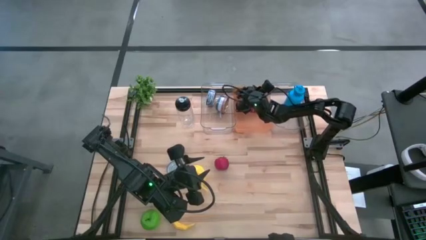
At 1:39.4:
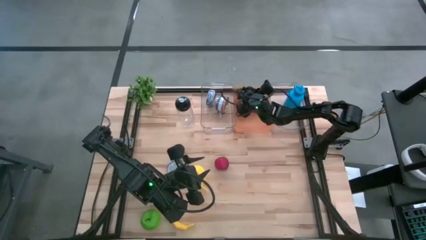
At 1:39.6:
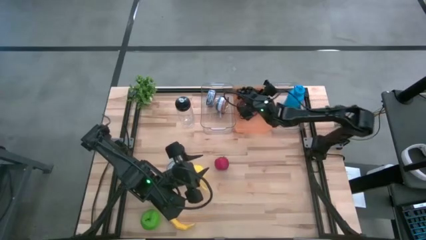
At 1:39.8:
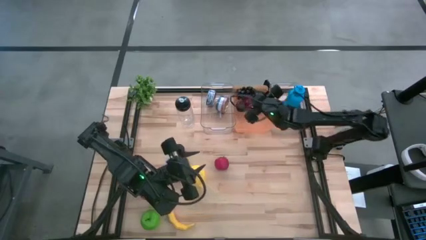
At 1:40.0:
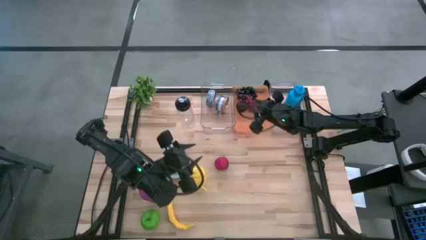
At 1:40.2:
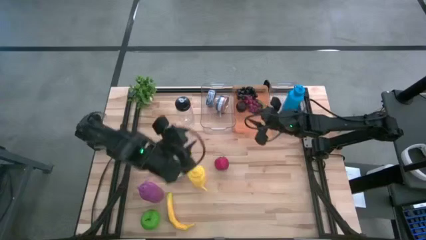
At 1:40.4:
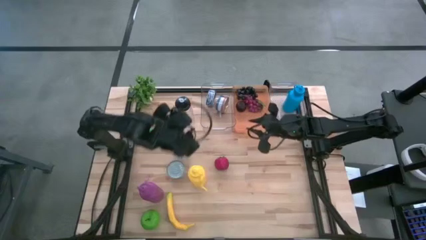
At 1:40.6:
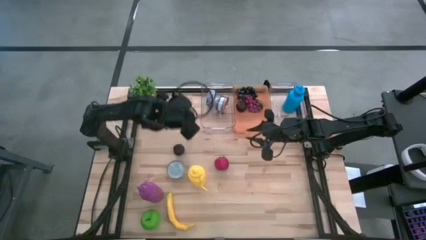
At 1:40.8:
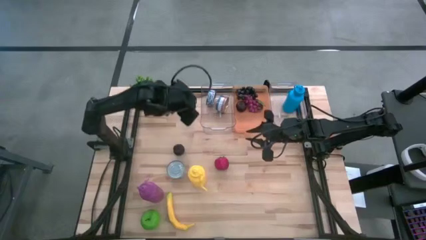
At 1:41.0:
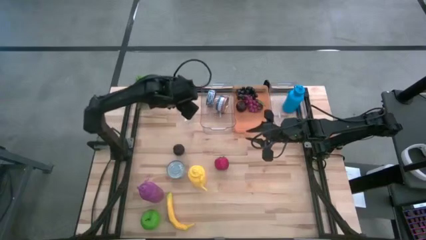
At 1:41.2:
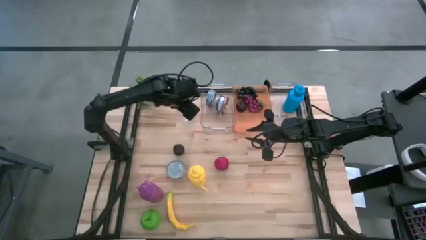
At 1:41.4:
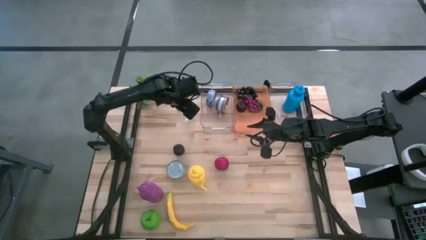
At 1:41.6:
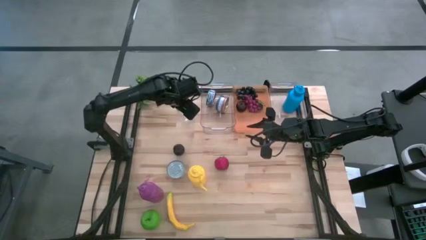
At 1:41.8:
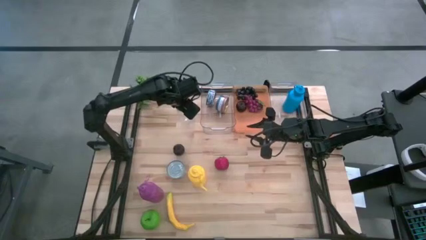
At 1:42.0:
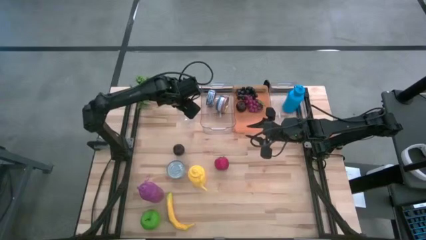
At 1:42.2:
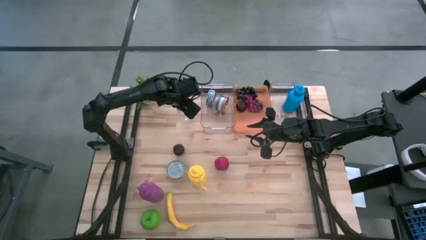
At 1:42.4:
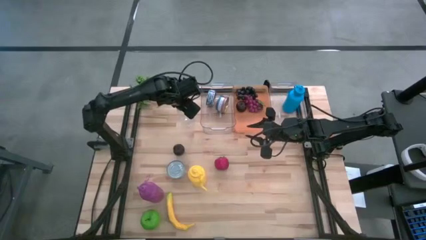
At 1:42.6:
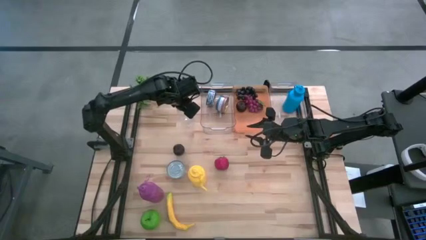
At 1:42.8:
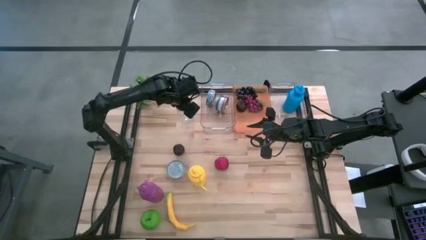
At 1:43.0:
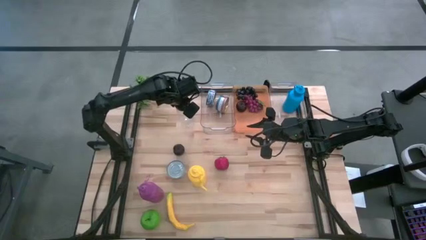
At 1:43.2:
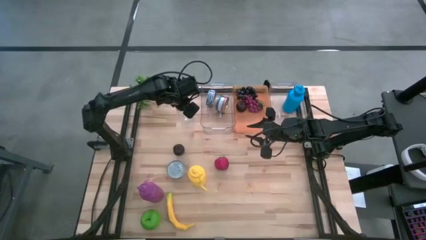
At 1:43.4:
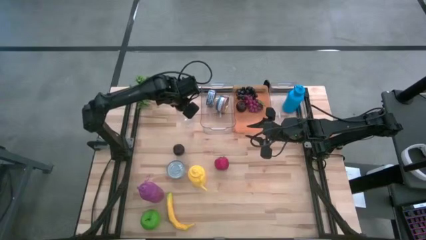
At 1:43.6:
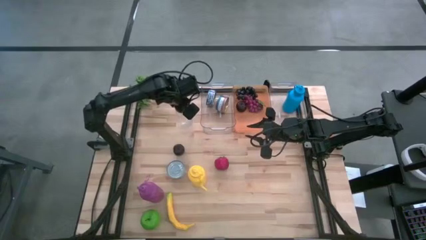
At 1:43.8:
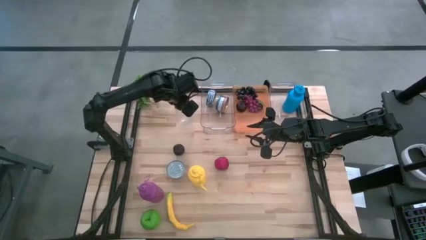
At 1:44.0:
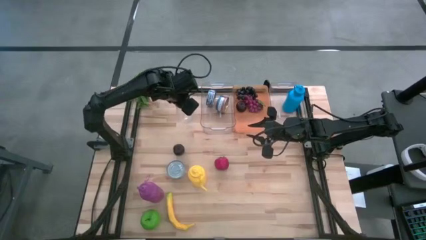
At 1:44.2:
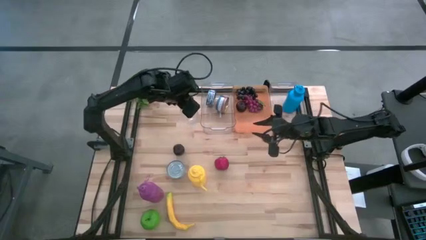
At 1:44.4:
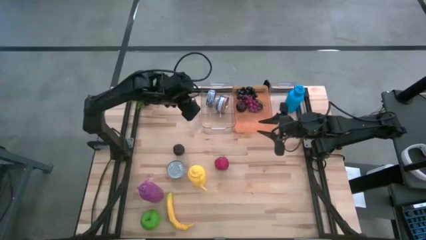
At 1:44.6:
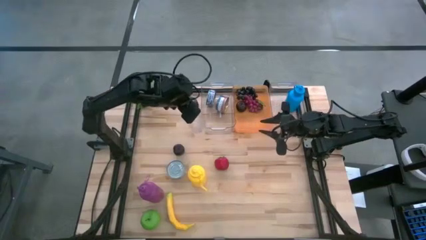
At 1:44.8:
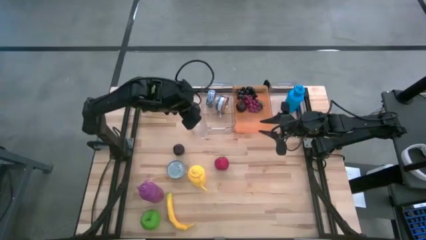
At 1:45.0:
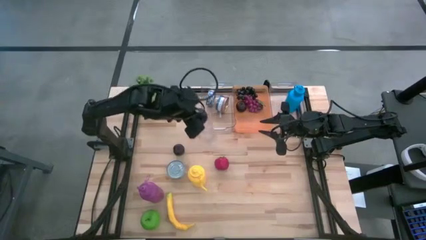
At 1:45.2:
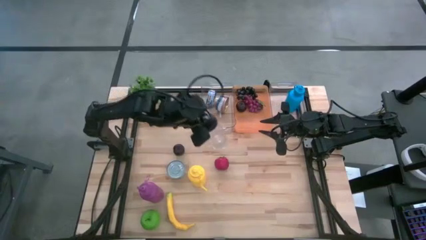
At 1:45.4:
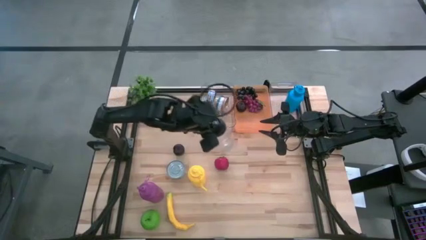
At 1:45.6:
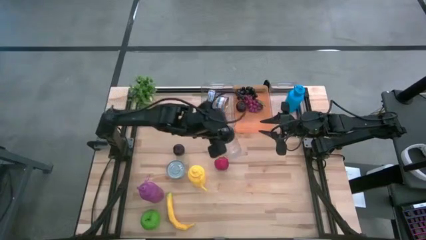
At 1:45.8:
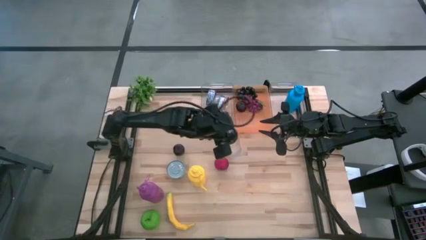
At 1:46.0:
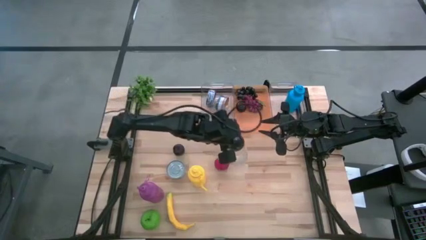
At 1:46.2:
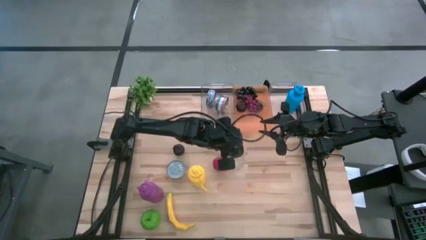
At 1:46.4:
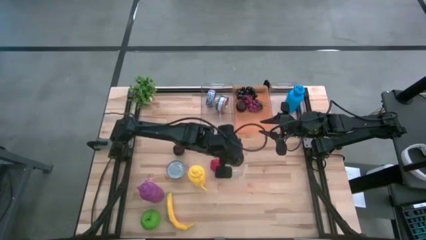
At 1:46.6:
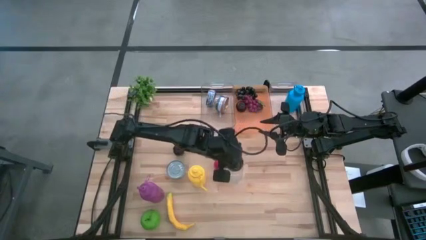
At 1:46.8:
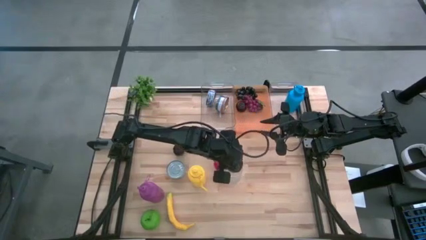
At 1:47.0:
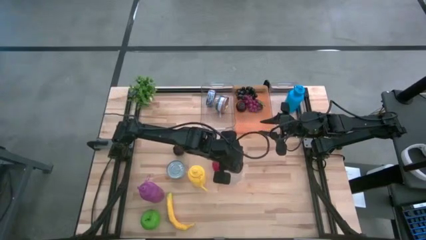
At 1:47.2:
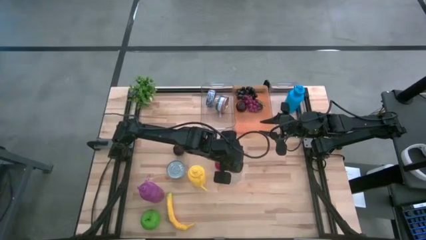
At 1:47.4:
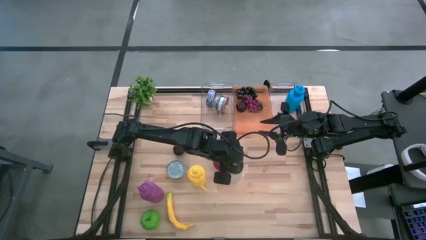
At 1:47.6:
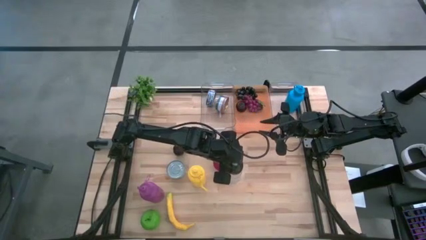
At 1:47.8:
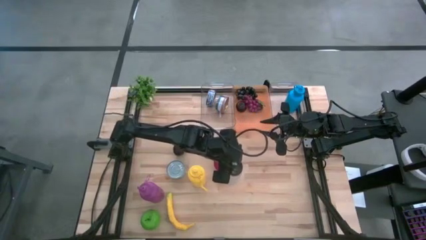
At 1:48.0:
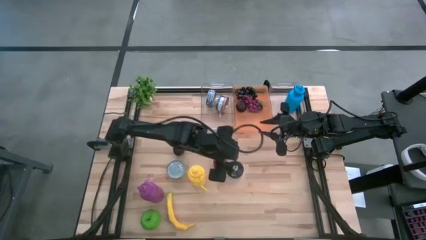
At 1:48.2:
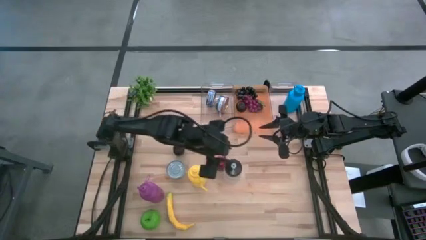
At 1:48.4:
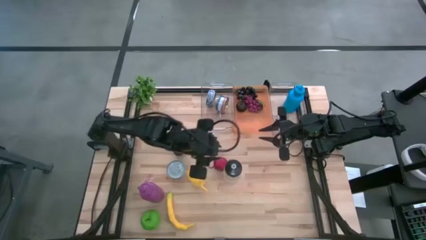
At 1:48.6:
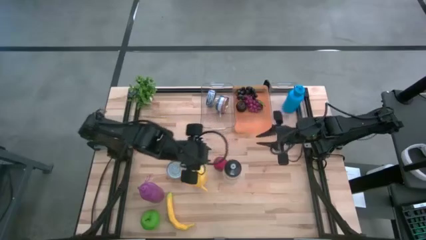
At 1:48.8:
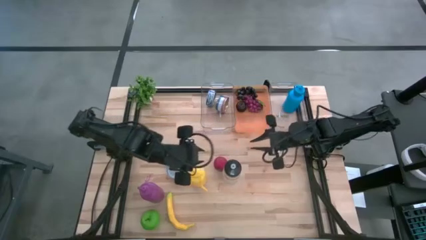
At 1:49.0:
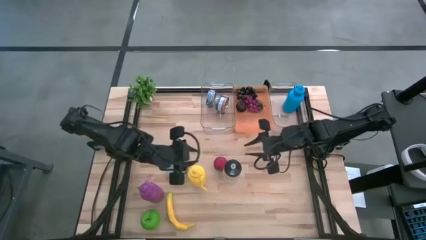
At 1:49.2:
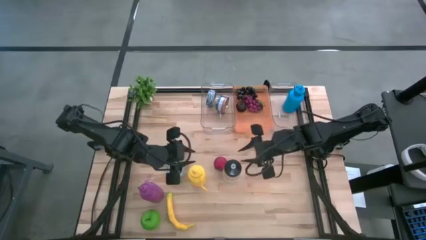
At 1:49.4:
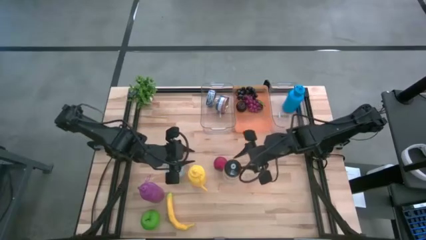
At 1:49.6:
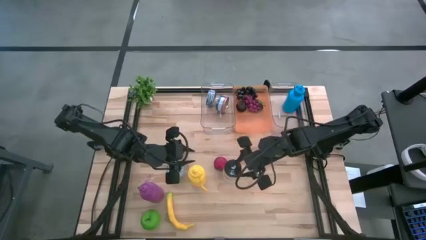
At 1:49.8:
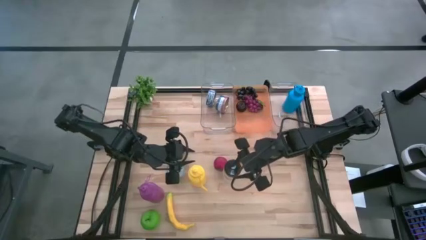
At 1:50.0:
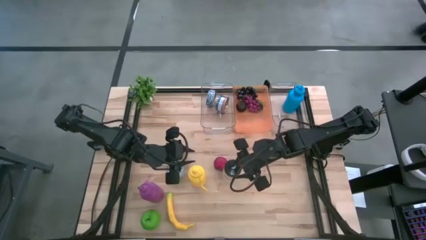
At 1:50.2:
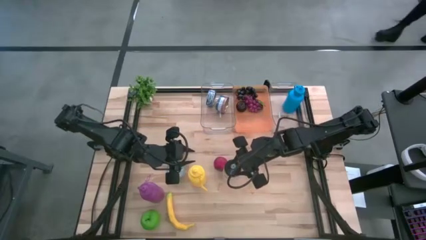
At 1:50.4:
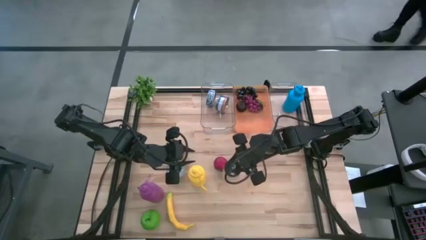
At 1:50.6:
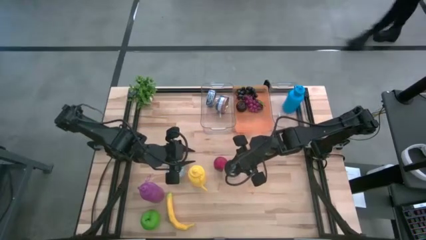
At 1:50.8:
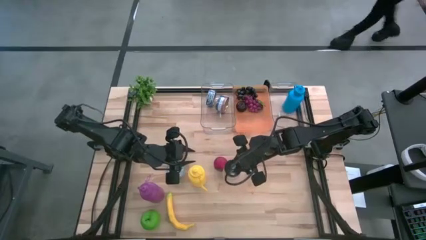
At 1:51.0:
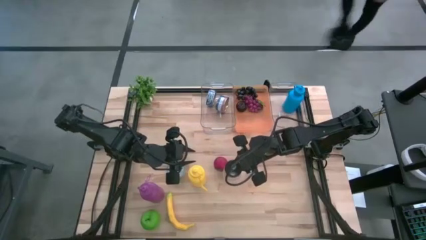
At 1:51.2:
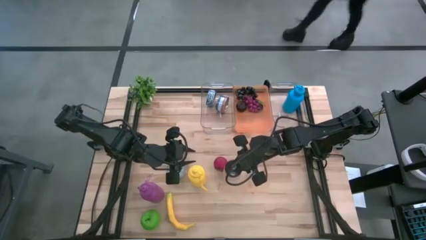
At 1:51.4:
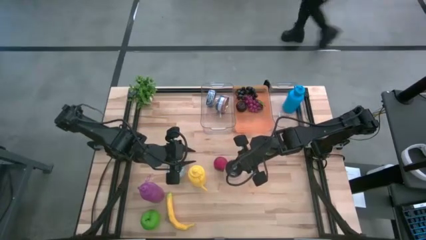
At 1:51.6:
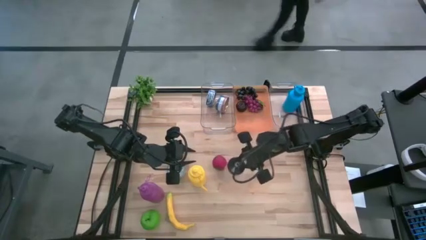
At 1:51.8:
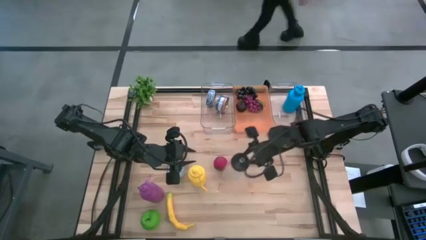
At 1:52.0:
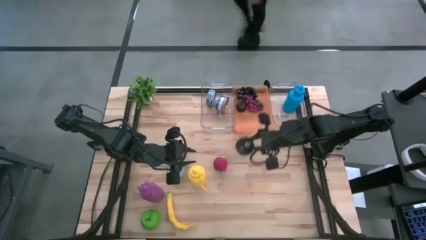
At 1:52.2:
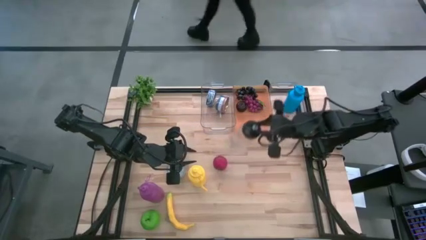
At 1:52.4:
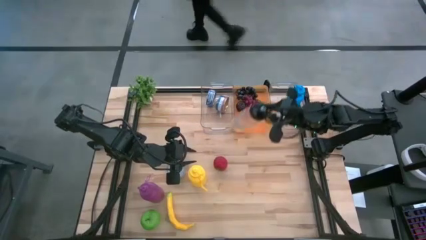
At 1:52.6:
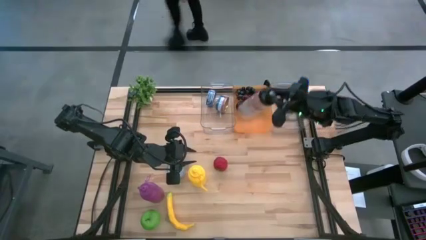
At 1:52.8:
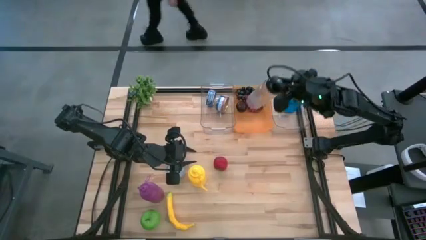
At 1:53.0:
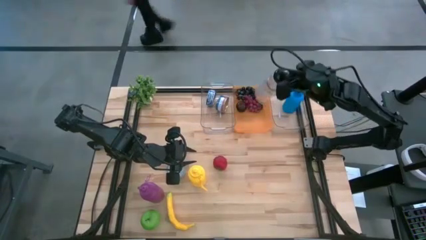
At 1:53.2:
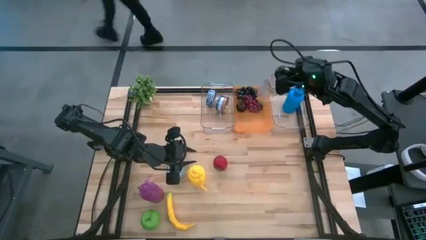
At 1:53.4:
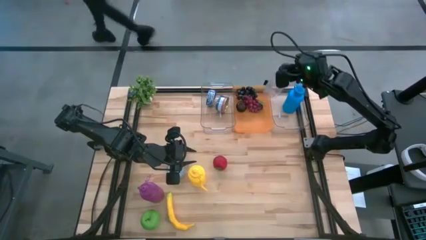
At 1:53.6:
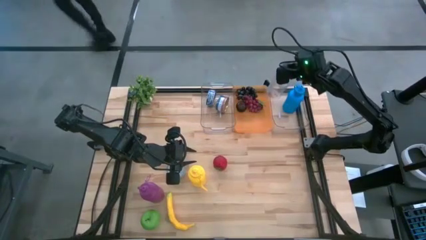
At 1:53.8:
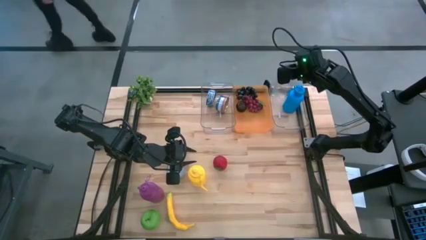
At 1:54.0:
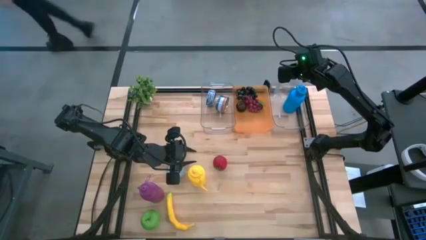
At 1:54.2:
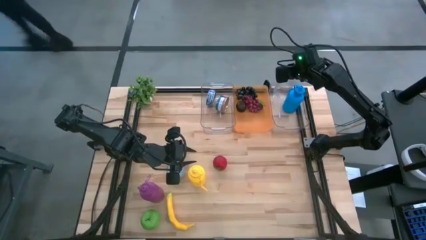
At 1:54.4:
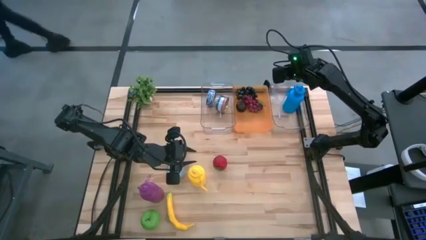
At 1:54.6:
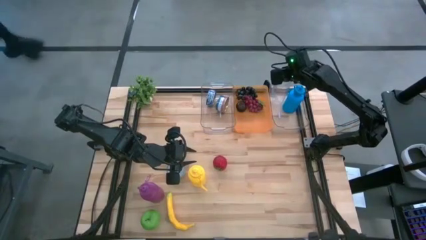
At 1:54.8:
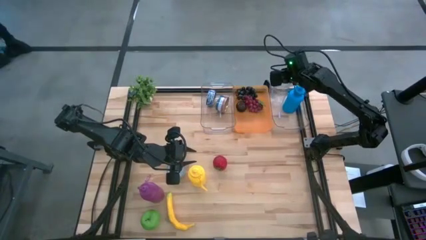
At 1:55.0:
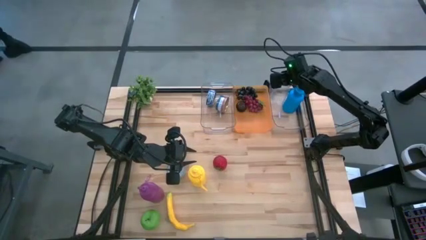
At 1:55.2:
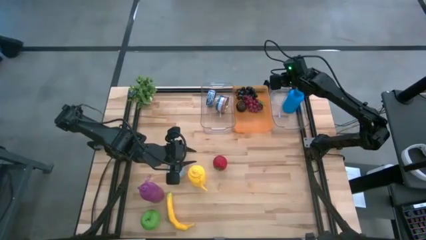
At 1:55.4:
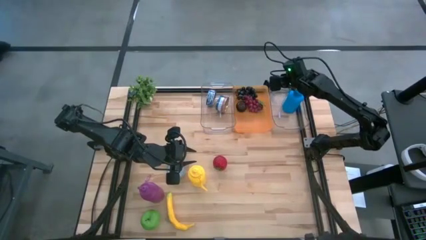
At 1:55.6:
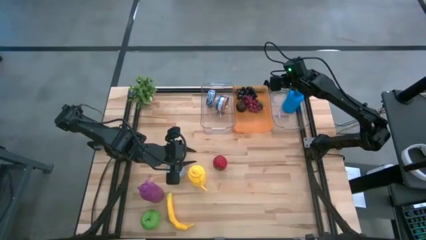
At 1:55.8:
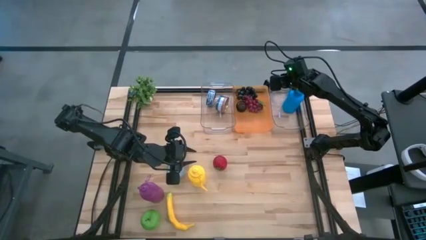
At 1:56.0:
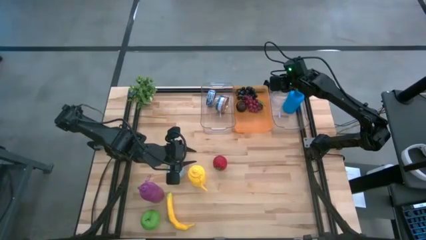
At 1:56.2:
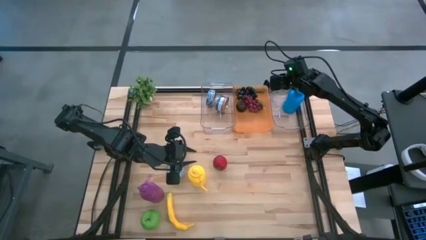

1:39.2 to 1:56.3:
Task: Pick & Place Food Item
Put the black tumbler into the right transparent bin
